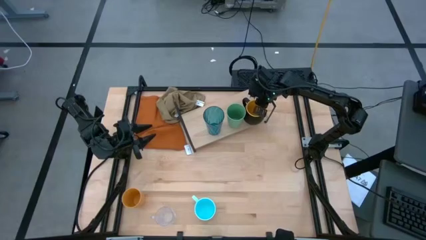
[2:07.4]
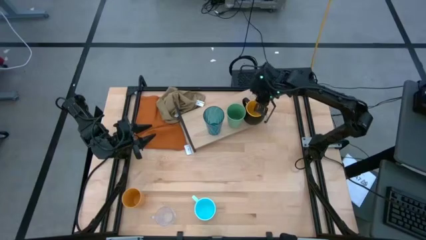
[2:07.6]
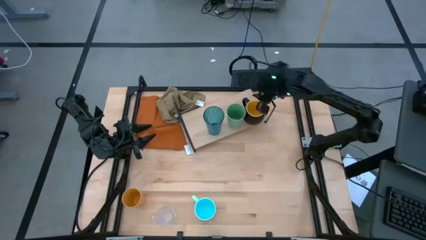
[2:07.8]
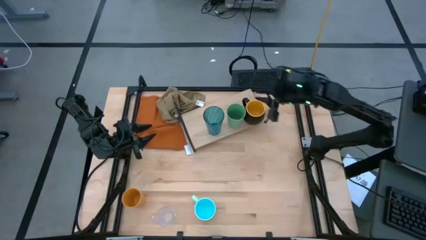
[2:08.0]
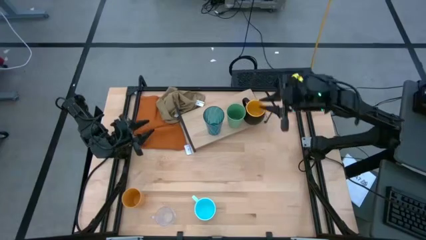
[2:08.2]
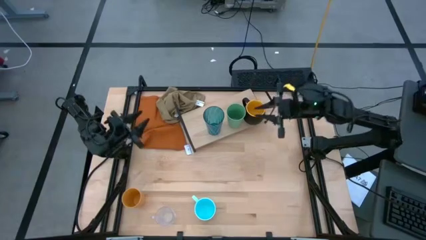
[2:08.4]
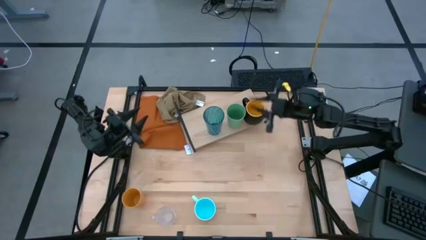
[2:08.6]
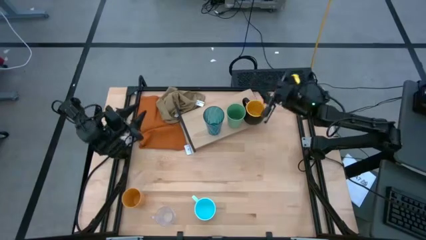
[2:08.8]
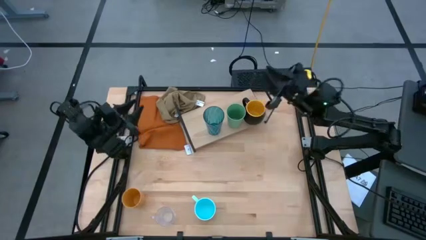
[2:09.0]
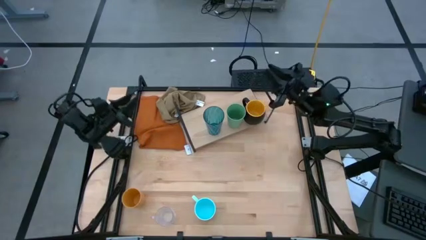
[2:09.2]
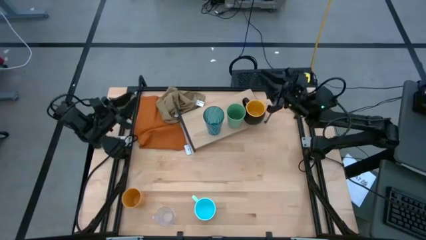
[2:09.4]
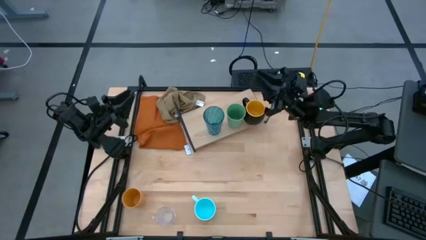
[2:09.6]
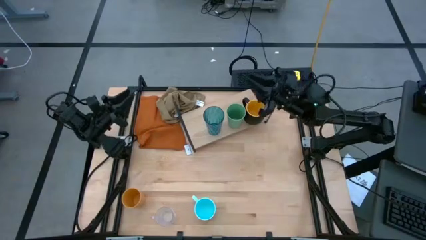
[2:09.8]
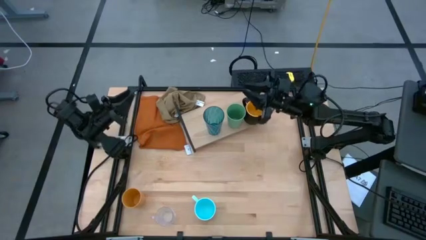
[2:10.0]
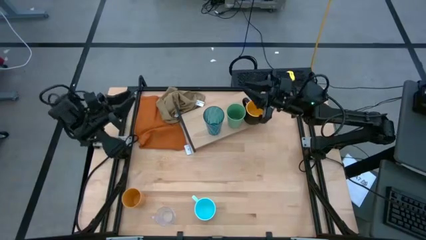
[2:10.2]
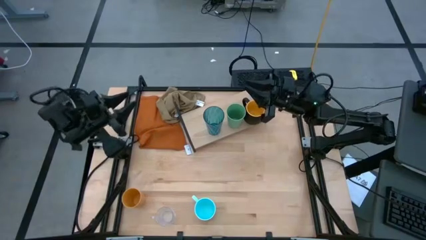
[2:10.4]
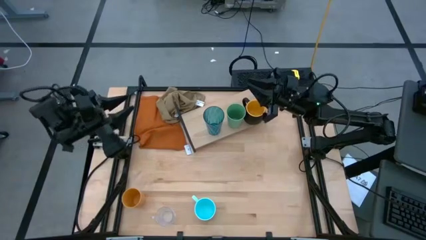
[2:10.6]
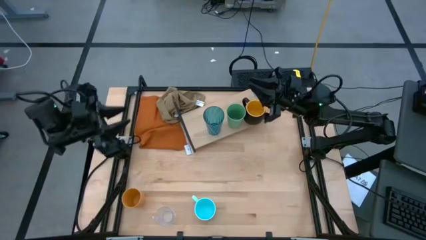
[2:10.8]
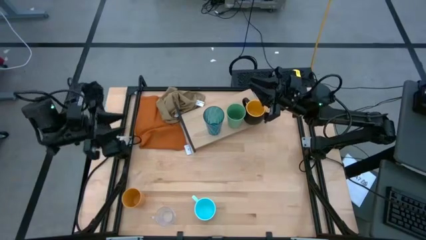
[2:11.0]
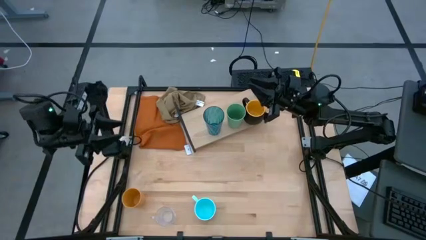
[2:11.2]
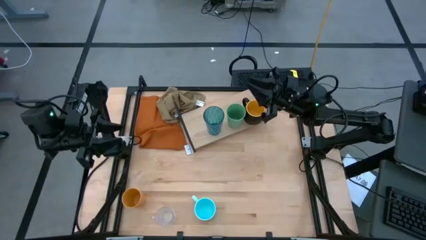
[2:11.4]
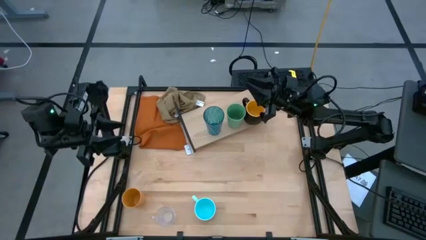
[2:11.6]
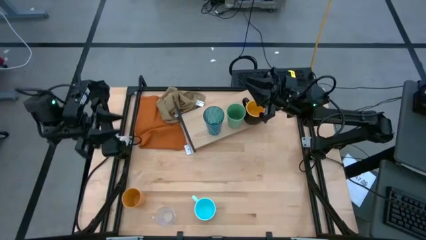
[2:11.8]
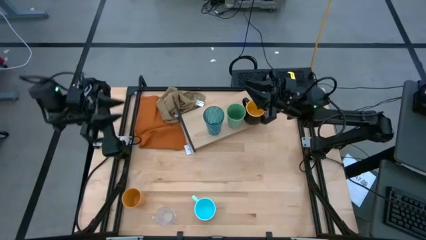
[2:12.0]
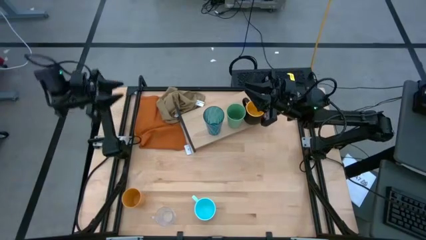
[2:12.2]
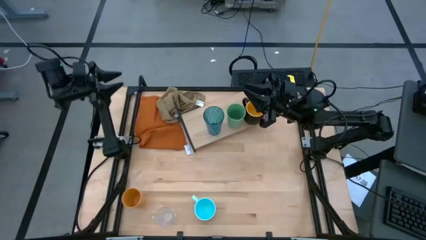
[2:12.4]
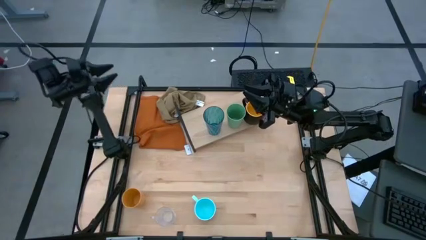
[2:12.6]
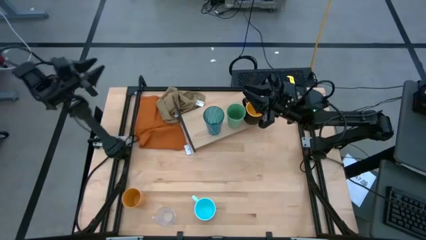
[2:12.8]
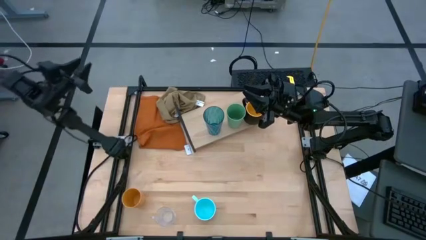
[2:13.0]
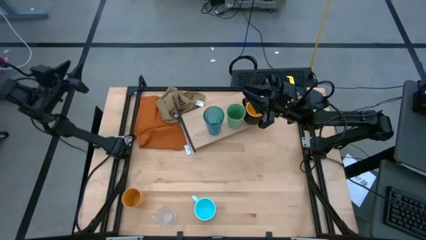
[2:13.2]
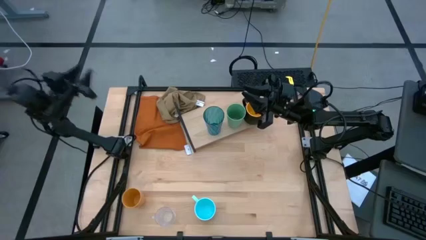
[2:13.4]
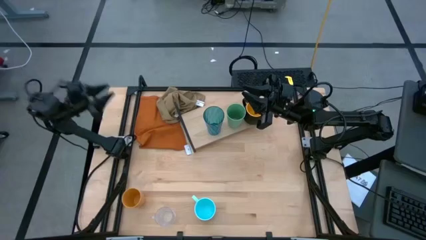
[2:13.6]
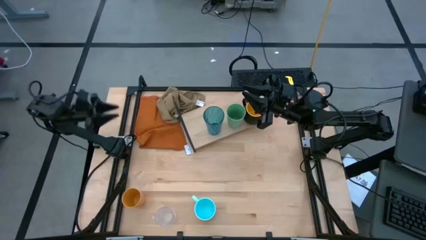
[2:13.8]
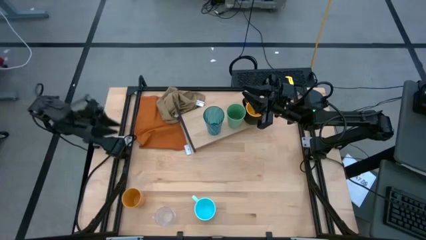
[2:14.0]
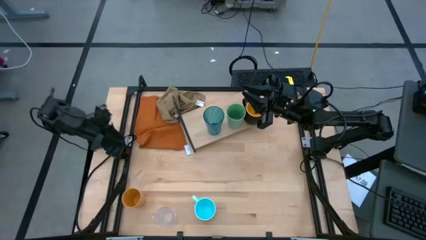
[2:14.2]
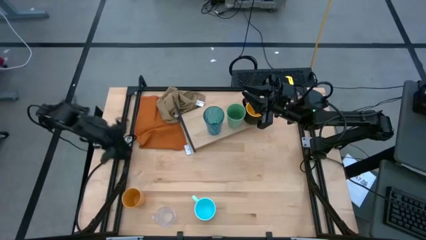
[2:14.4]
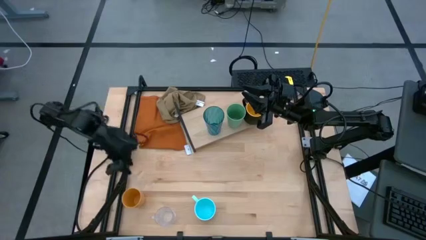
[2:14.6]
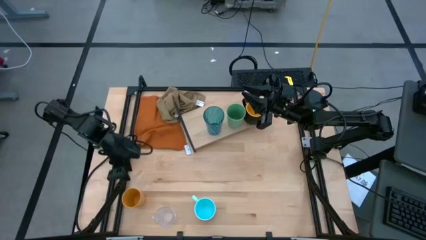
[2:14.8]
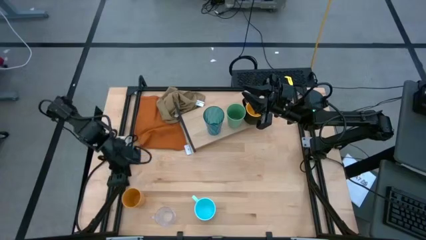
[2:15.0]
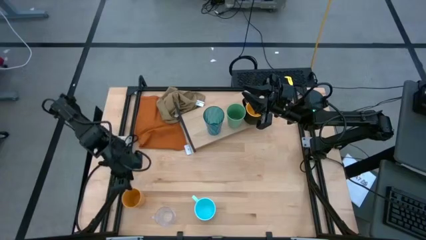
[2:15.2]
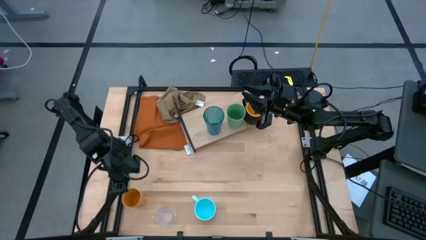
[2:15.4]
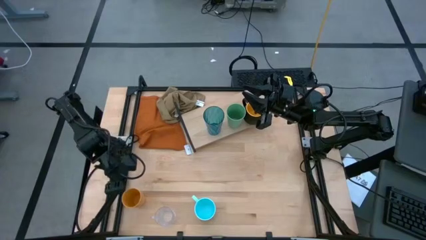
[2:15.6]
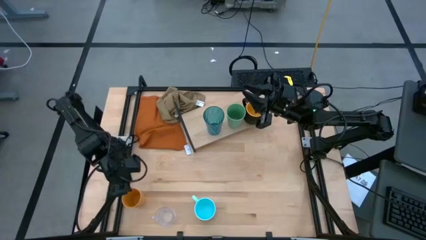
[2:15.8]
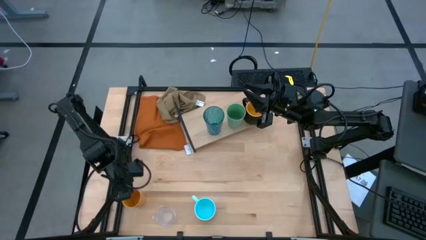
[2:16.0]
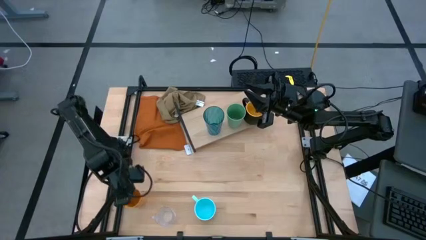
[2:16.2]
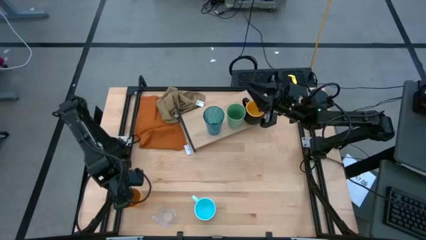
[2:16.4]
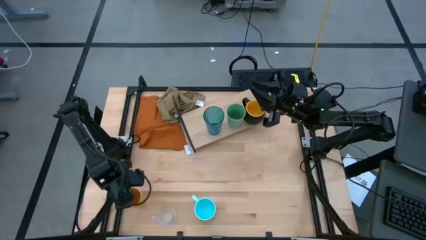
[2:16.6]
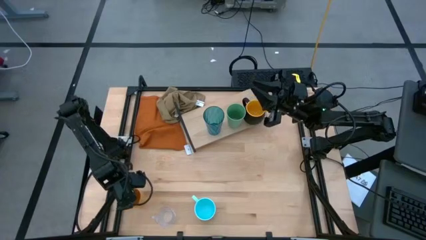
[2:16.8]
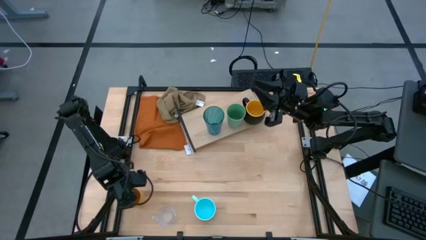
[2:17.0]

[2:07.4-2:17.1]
Task: Stack small to large cups/mugs on shelf
Put orange cup on the shelf

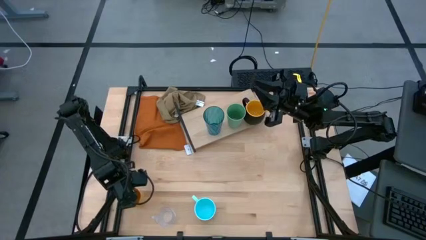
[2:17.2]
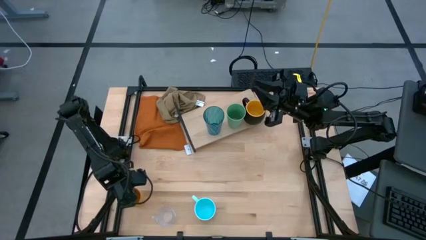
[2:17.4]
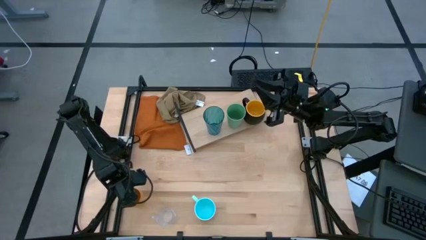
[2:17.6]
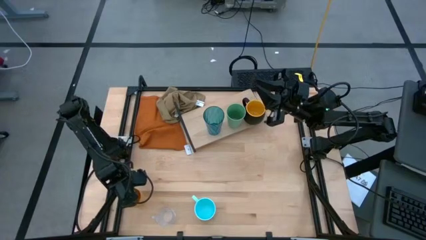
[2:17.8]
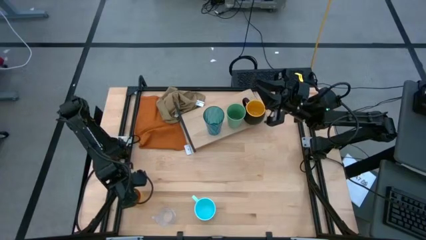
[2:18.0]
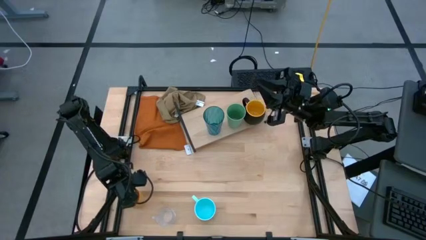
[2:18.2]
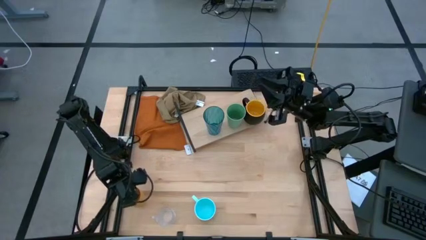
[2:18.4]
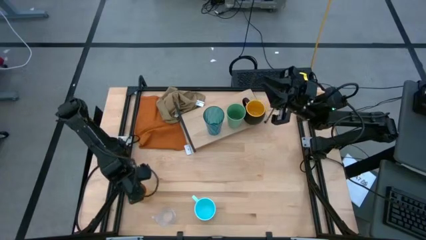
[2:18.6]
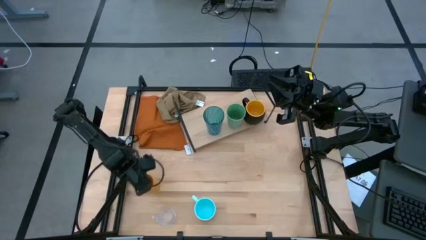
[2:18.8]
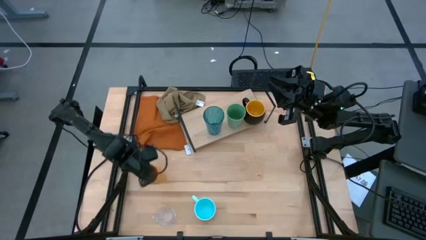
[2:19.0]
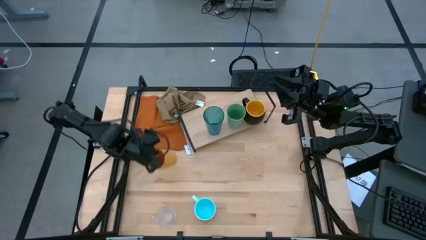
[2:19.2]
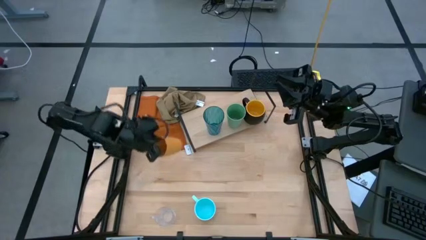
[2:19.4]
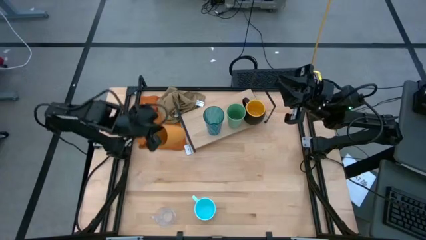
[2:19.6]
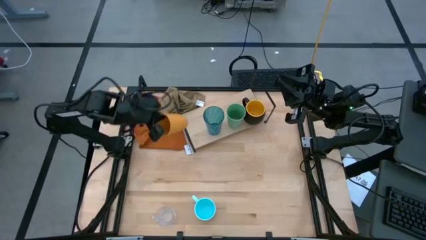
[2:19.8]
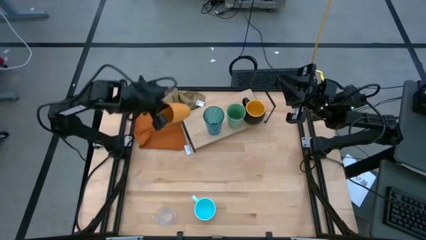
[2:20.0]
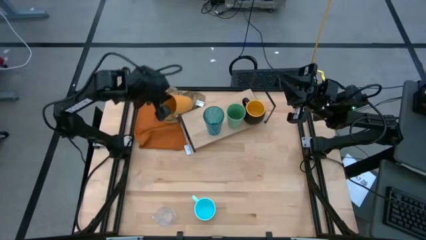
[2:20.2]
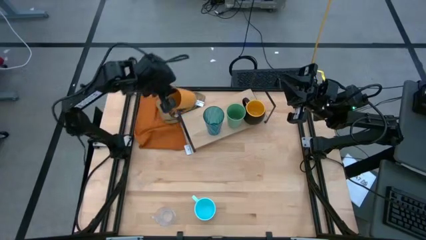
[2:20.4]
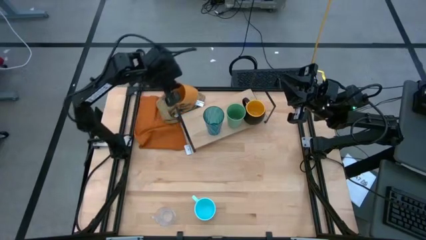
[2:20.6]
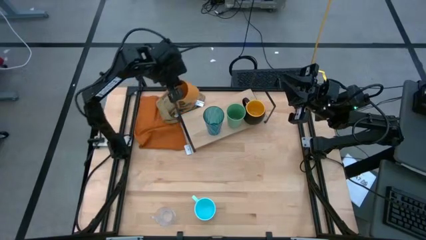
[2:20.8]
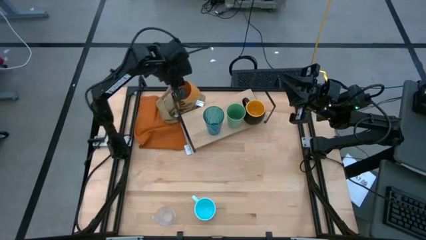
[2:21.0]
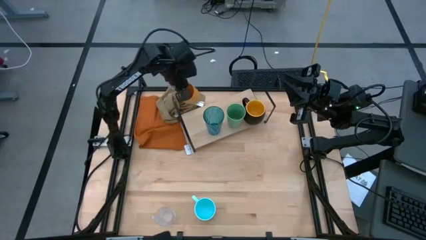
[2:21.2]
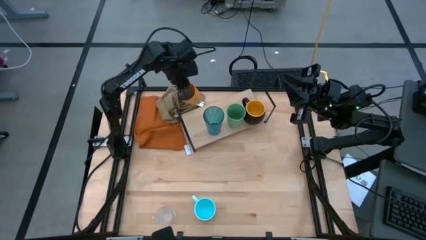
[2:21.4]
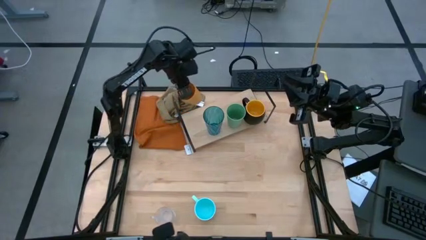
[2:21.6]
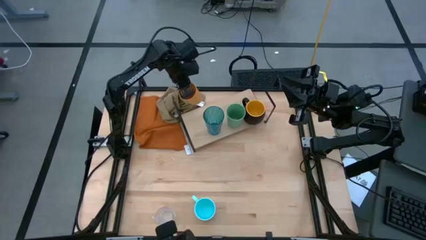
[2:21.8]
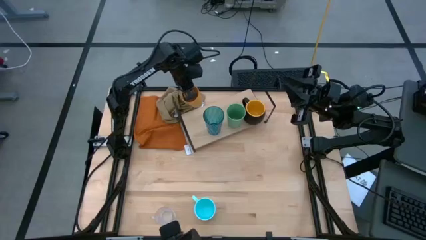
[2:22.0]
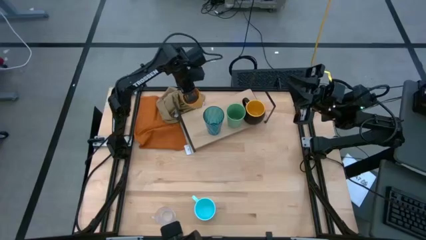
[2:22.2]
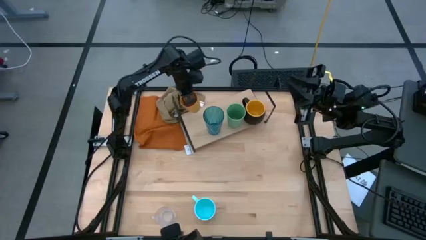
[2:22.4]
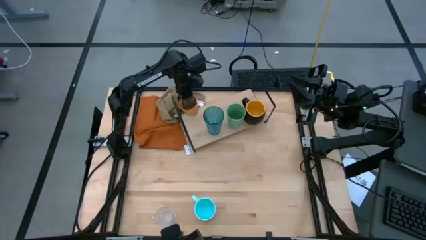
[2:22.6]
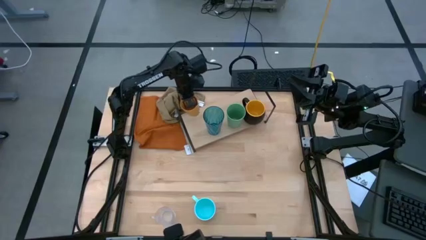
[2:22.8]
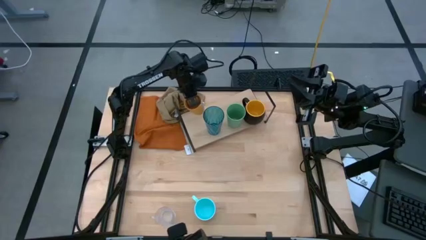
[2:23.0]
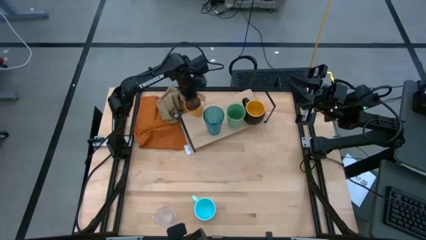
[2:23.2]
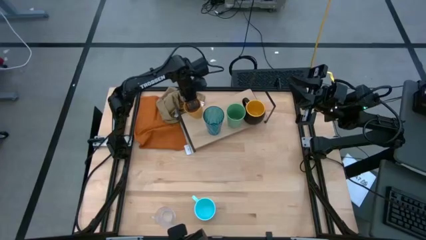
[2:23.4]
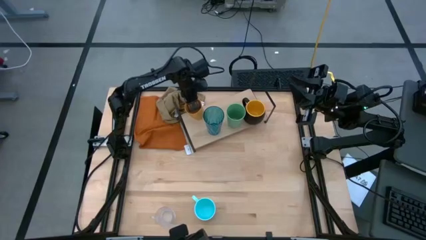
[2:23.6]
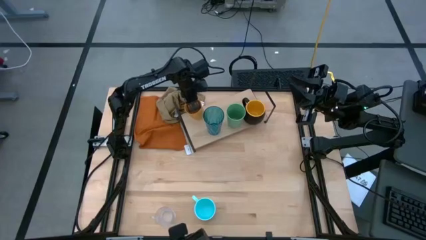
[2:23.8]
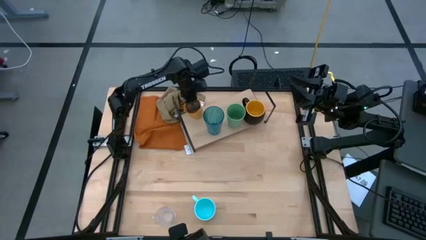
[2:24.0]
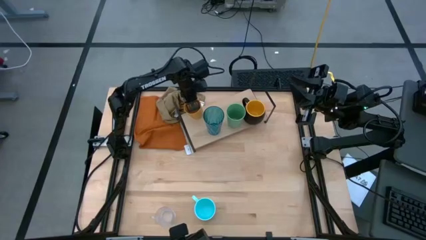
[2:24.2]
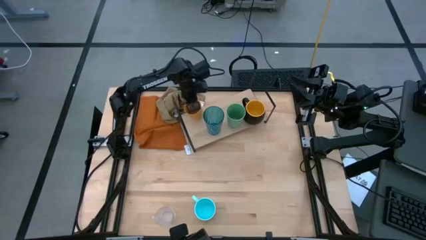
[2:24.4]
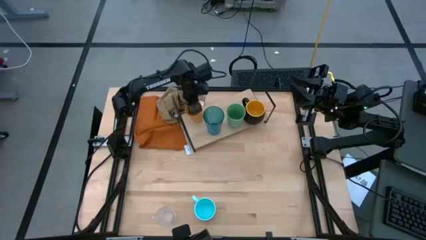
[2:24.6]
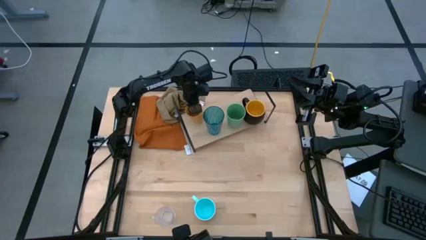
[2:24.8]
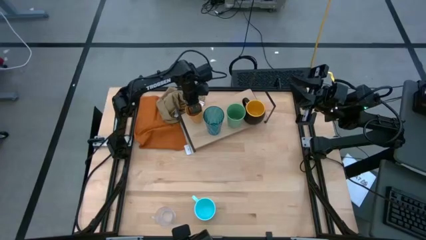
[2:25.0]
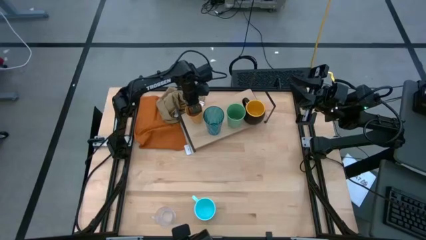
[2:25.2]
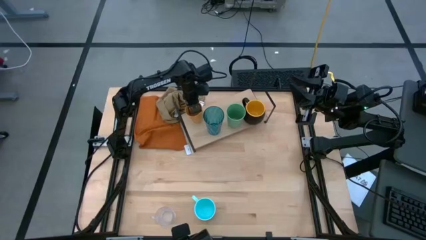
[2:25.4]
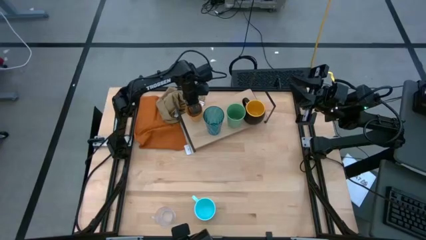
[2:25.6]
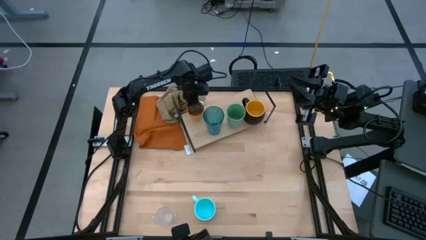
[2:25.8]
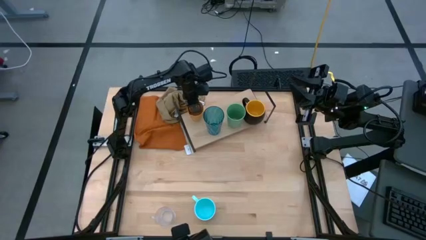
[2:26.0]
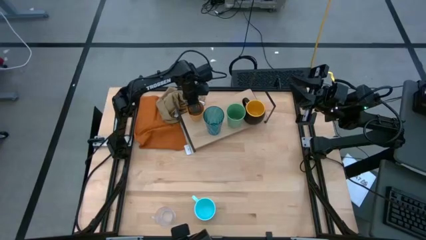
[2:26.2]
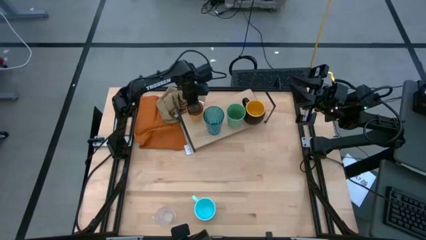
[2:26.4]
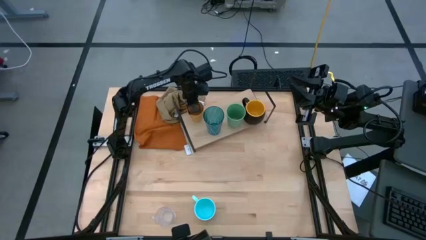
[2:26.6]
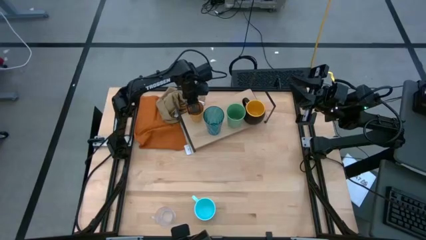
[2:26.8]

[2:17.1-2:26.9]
Put orange cup on the shelf
